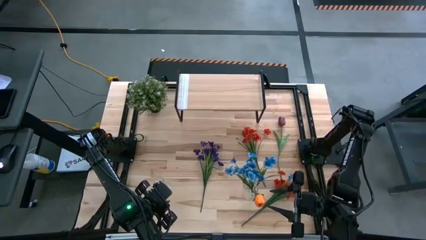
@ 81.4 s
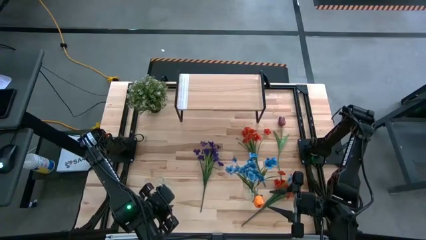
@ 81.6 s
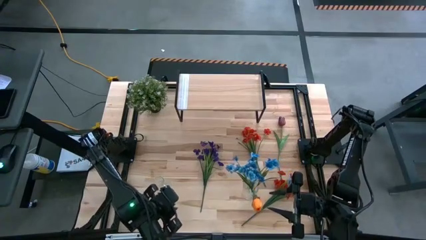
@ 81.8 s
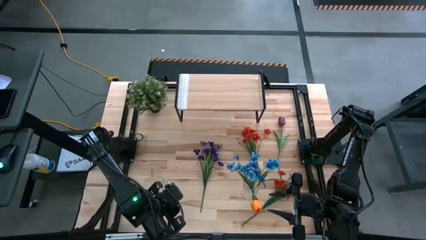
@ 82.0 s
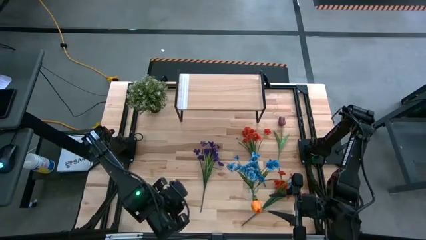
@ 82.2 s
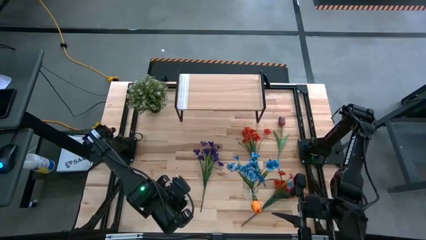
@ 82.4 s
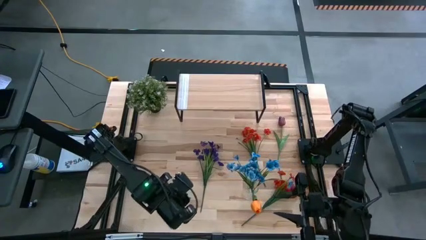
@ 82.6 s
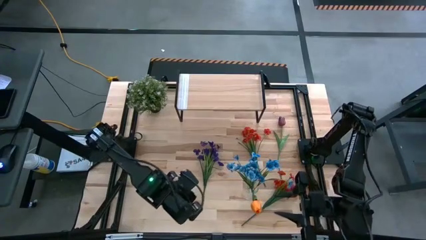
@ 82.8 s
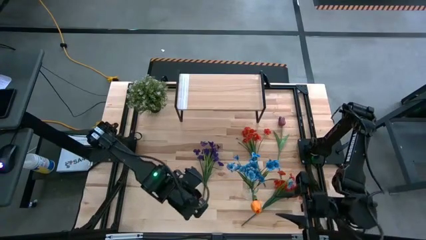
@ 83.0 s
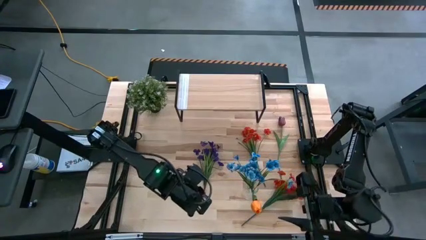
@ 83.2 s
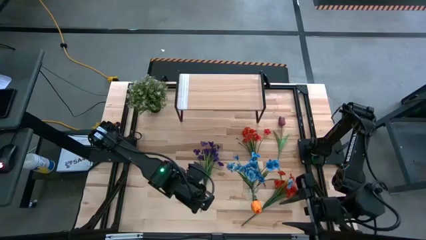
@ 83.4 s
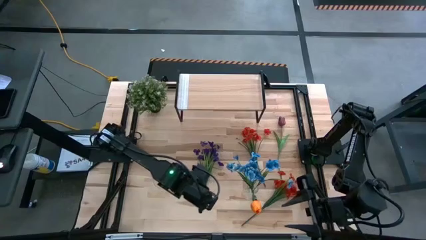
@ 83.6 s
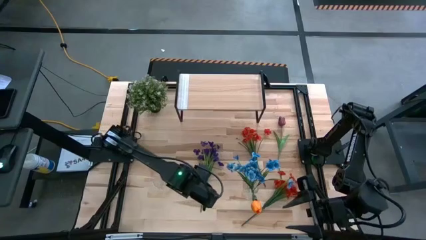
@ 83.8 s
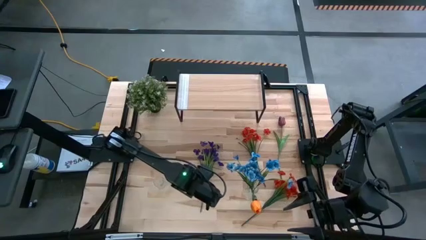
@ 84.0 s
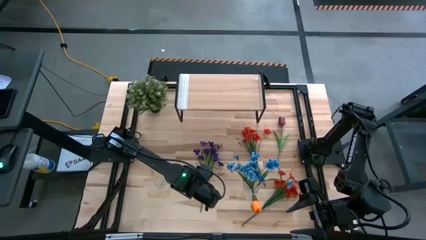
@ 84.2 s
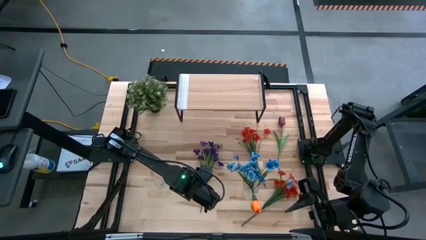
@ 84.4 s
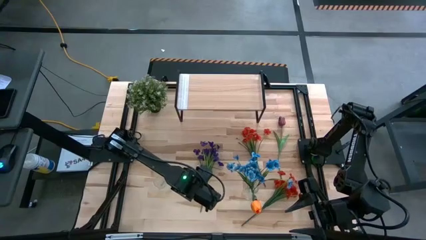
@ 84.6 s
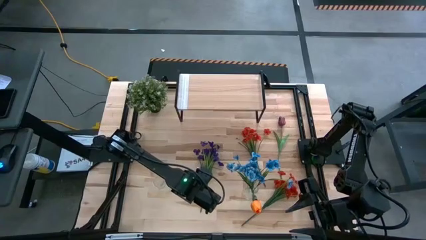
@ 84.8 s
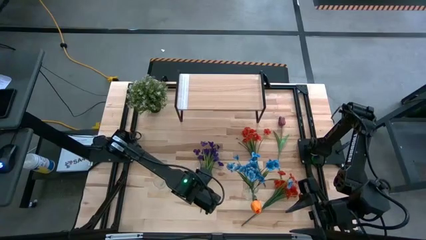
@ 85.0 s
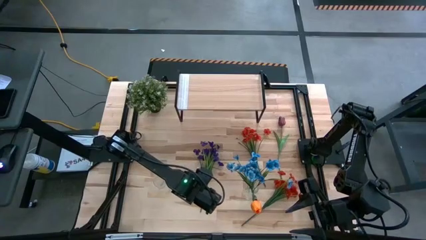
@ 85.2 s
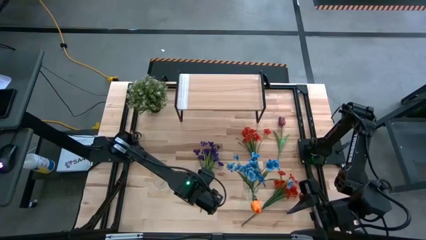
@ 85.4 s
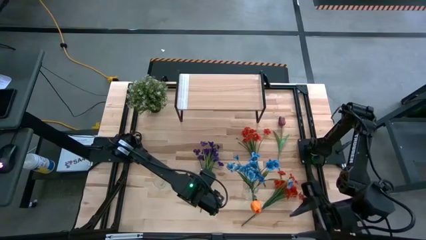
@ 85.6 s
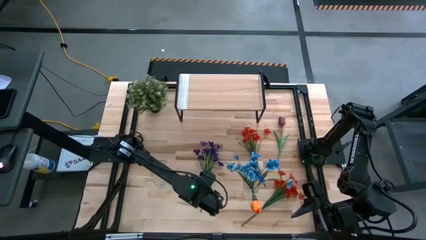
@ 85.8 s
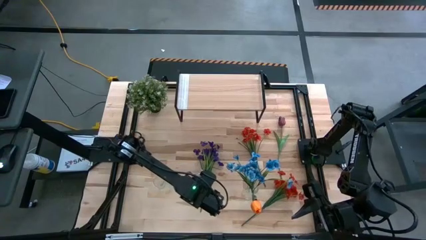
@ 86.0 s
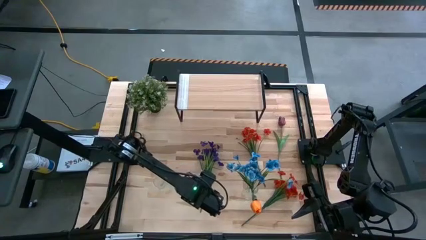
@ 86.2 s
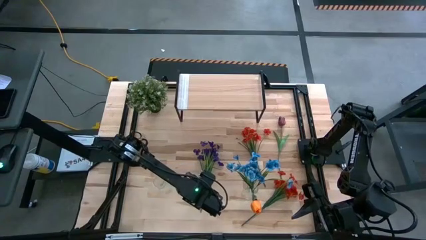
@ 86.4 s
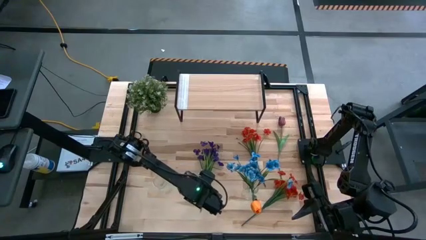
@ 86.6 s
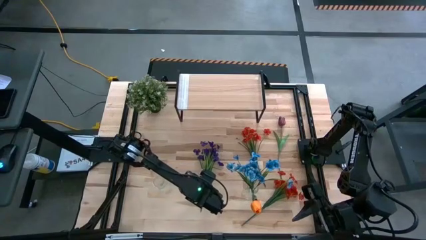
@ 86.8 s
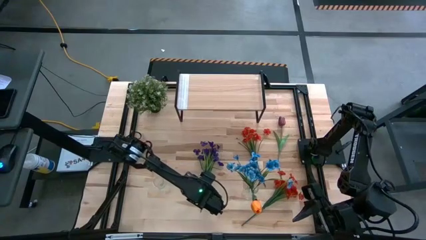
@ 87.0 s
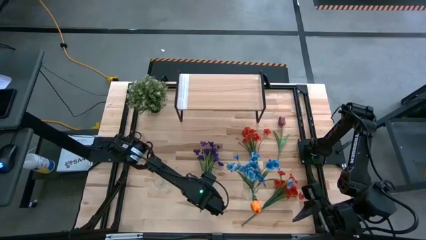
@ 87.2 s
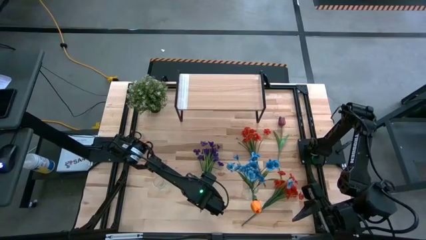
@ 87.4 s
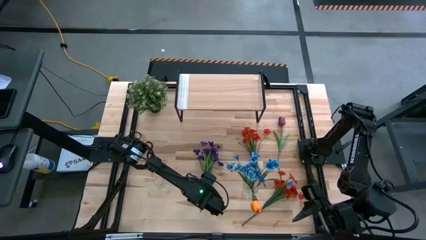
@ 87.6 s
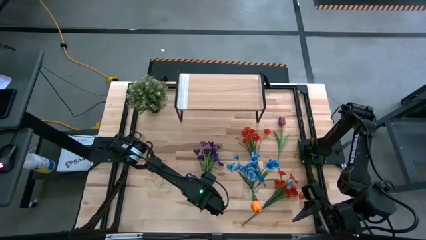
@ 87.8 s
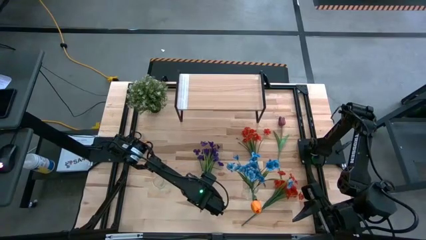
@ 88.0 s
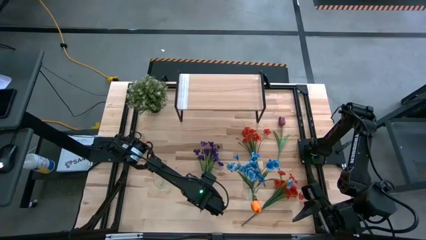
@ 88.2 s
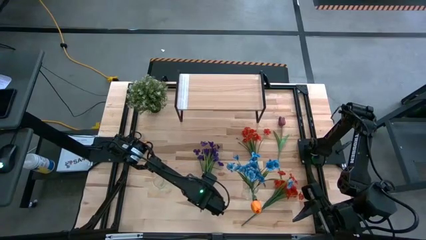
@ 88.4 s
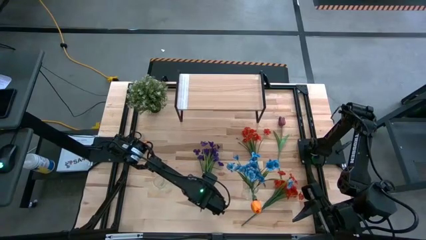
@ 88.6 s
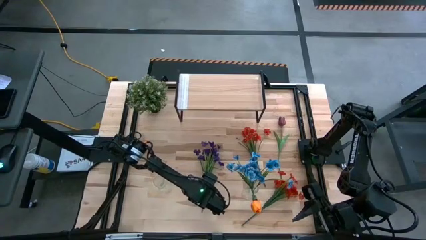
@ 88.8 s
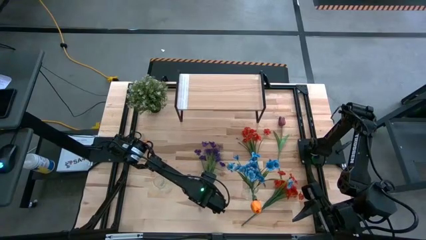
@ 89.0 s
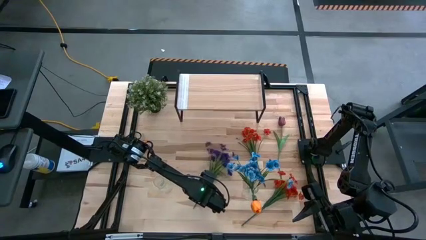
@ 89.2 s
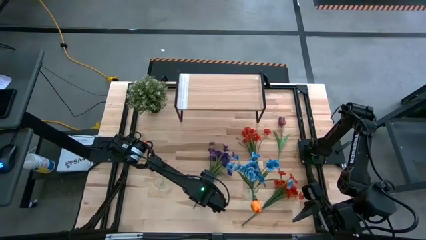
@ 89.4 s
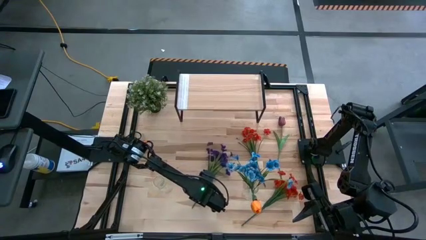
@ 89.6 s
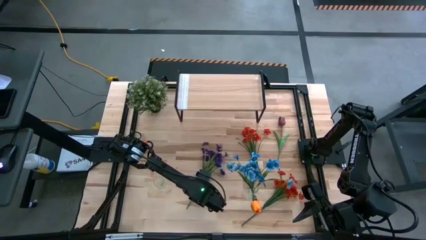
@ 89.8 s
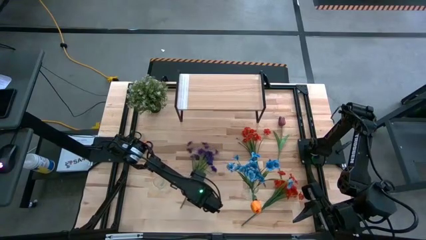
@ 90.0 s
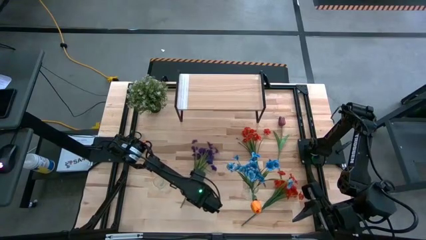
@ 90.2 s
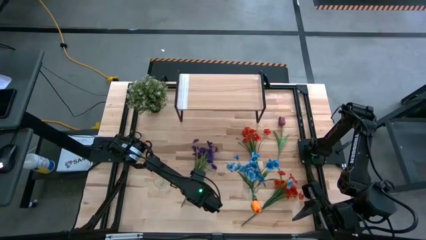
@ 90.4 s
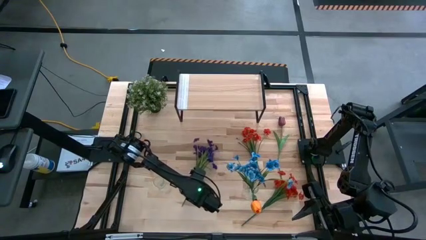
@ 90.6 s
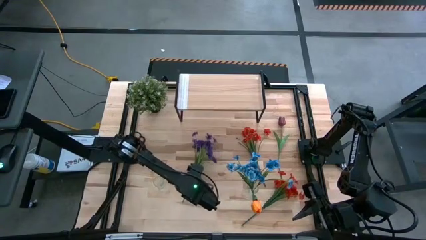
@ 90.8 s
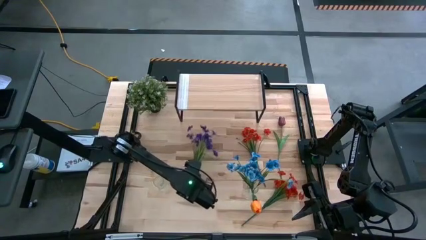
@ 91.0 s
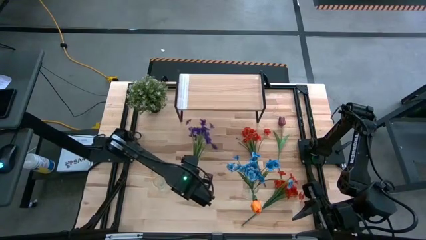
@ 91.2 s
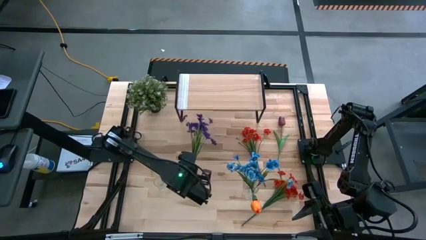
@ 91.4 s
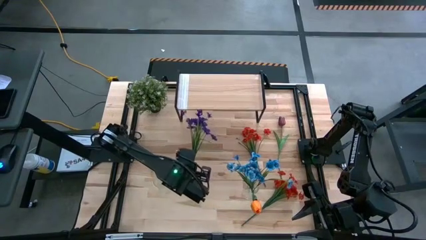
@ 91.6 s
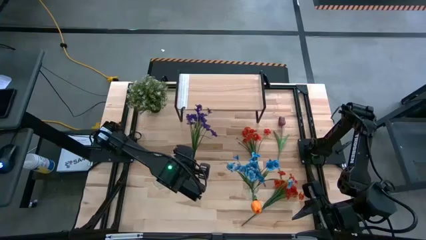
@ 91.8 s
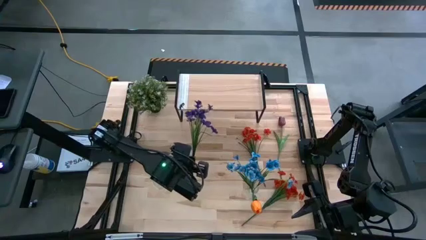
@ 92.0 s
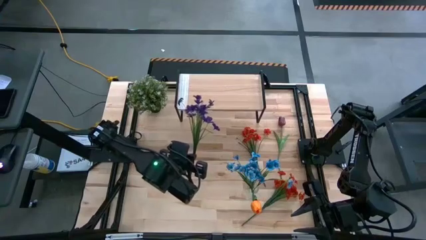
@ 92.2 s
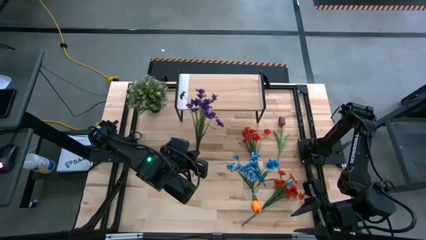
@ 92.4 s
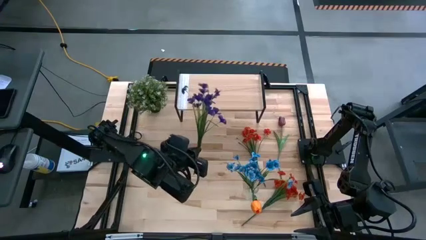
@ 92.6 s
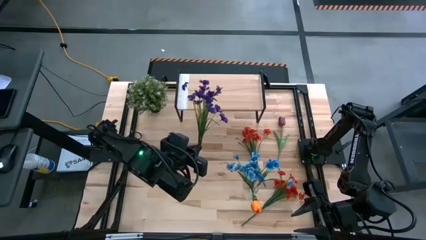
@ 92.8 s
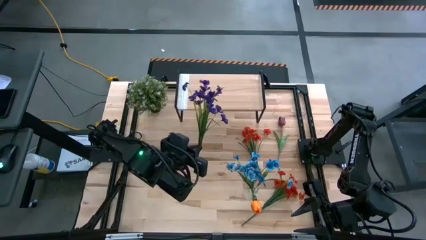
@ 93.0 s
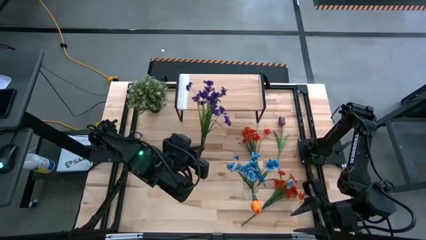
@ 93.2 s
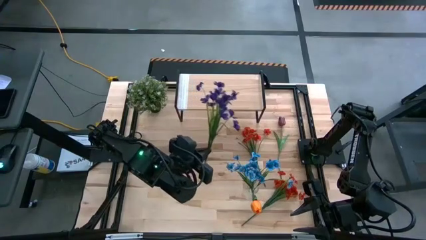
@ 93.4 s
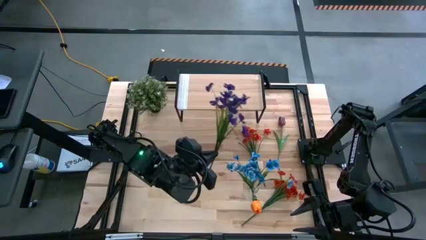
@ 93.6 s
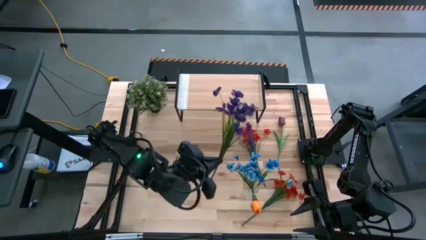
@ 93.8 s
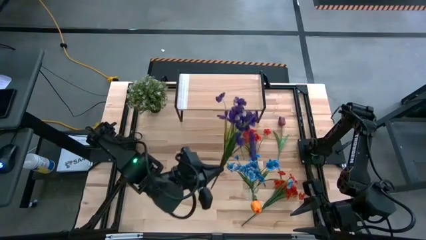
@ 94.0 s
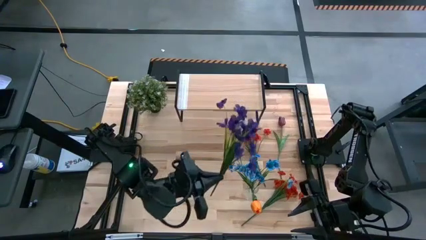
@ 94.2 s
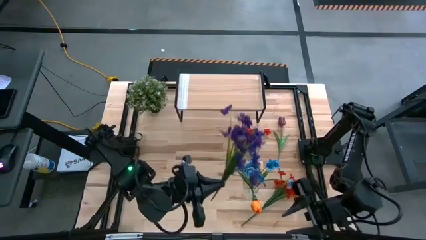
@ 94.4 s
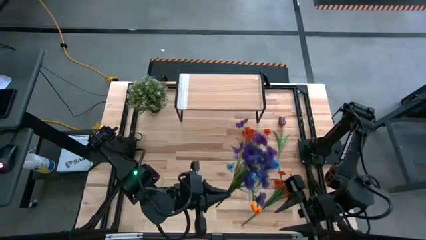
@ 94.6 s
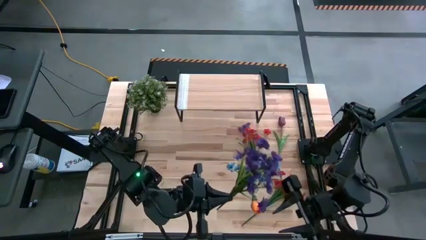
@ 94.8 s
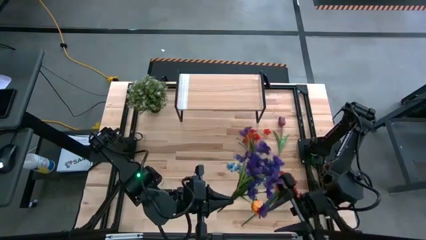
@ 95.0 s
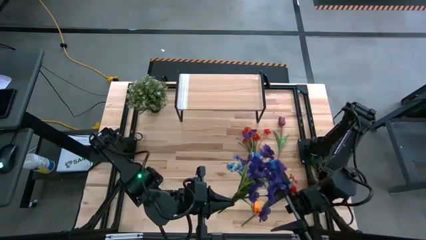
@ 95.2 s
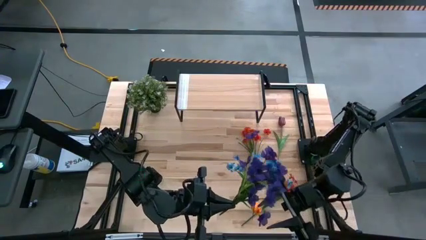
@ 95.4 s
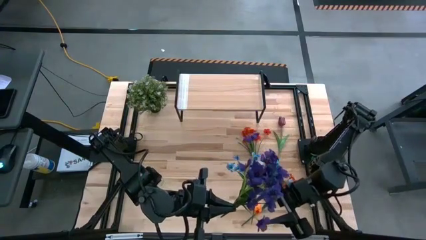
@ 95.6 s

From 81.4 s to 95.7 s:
Task: Pick and place flowers into a vace then onto a shelf
Put the violet flowers into the right transparent vase
